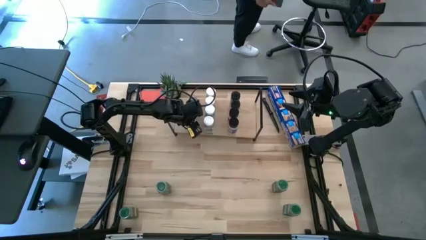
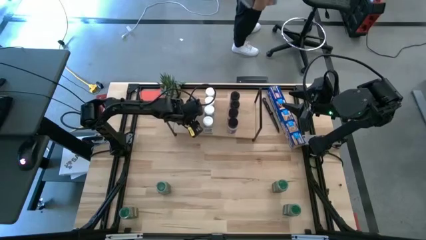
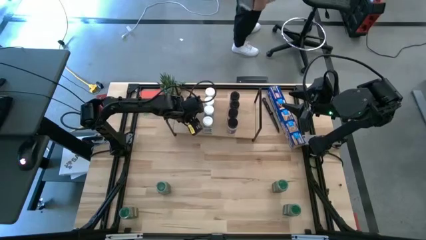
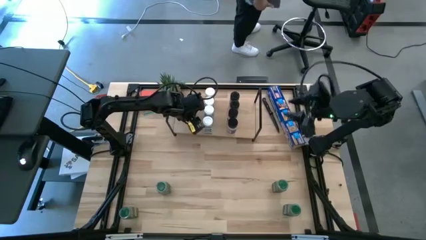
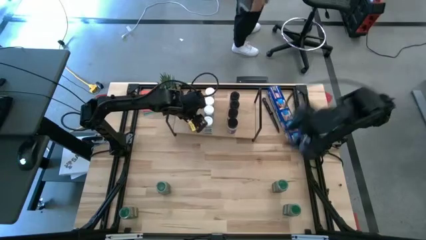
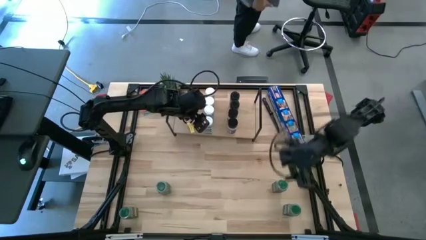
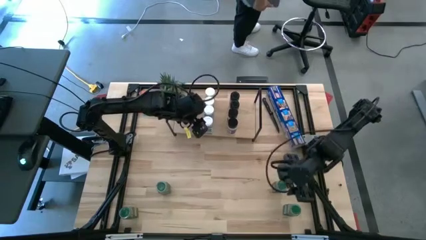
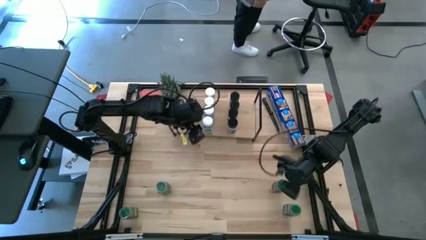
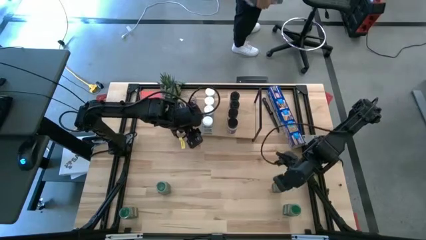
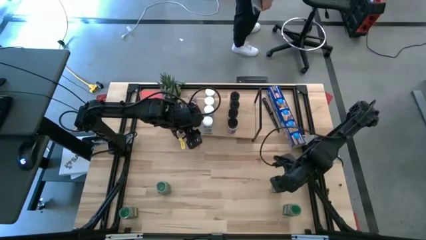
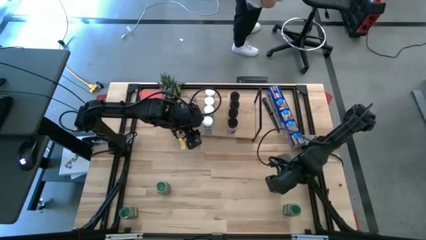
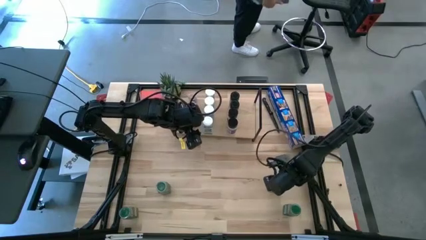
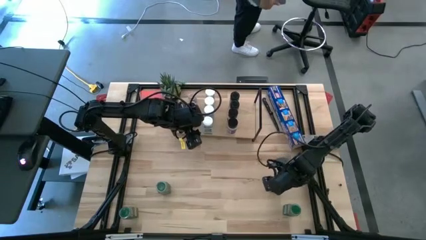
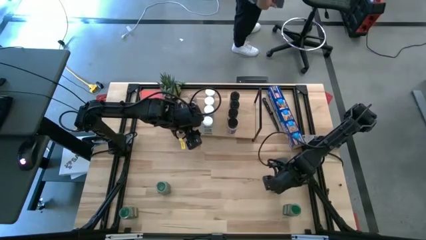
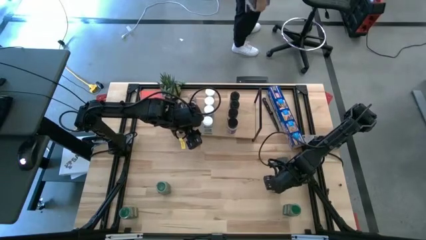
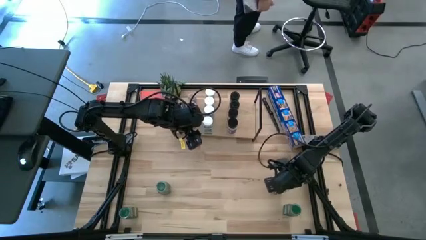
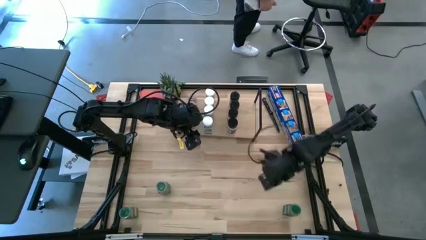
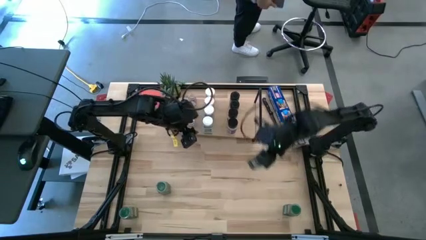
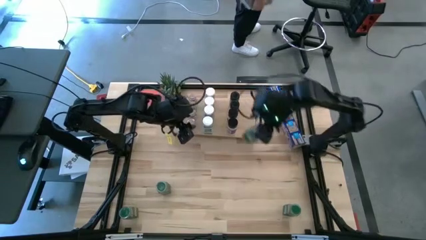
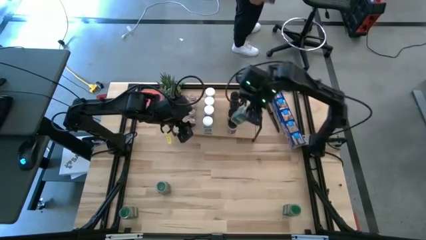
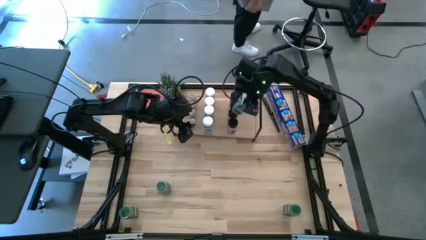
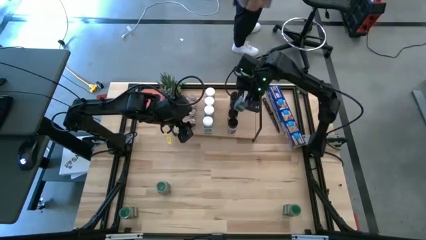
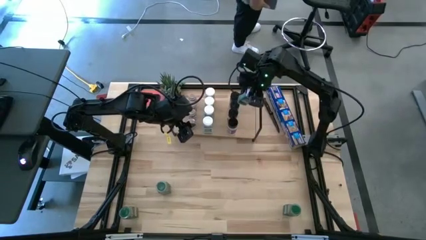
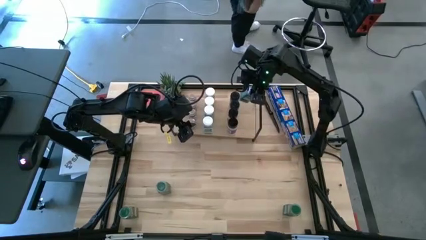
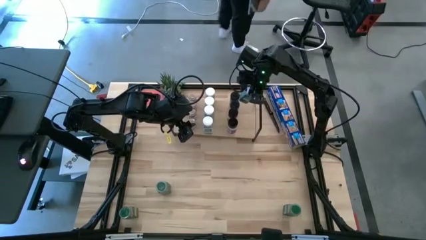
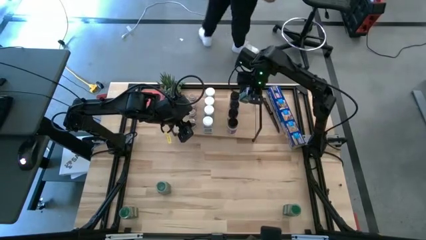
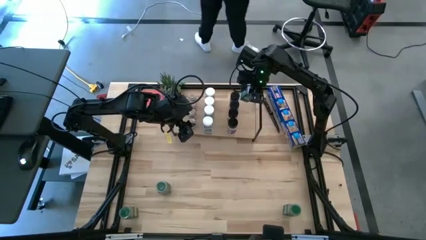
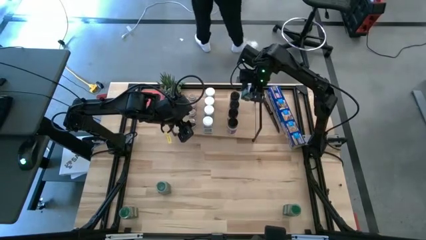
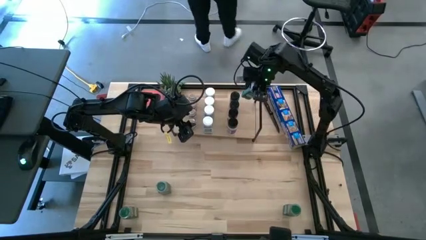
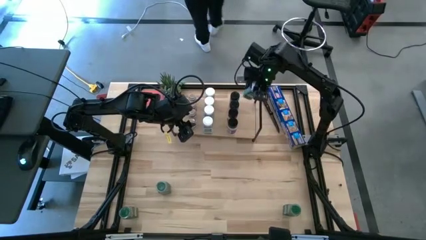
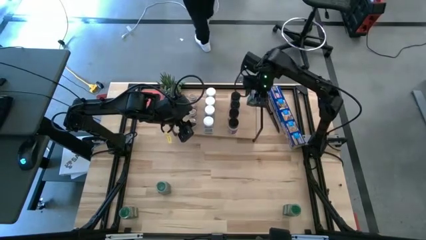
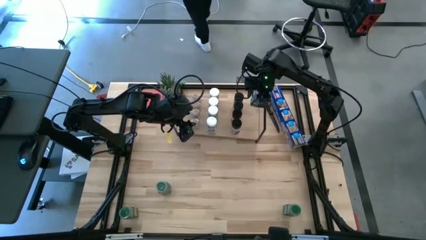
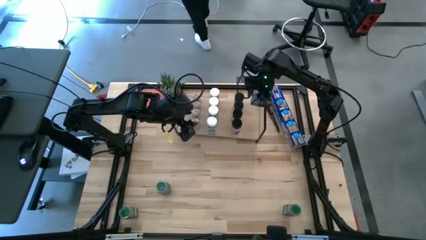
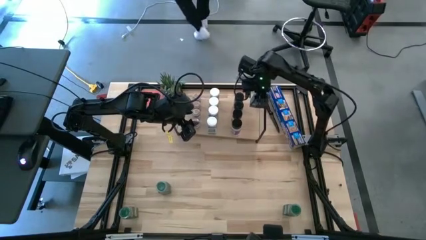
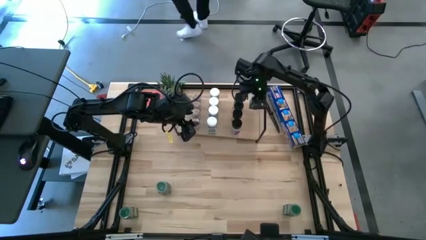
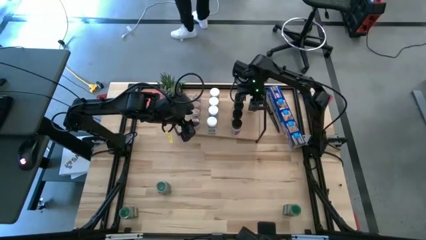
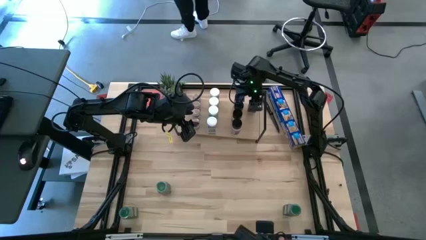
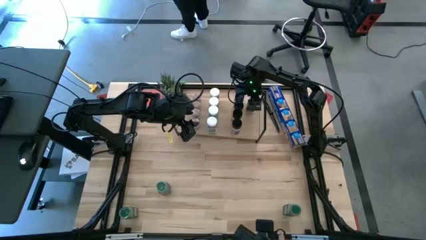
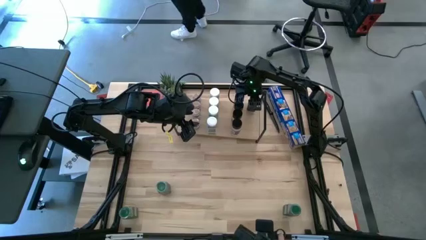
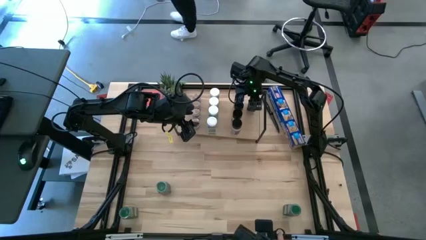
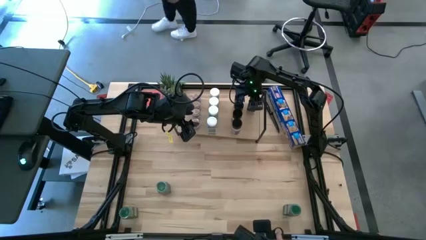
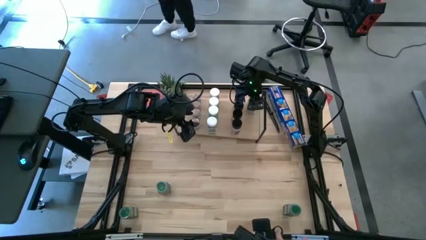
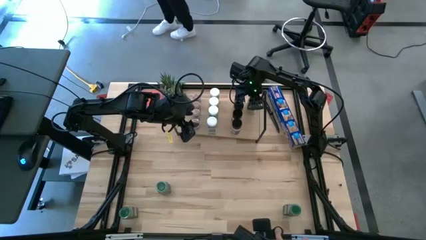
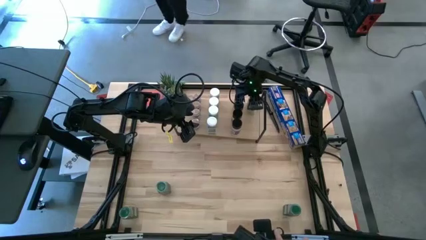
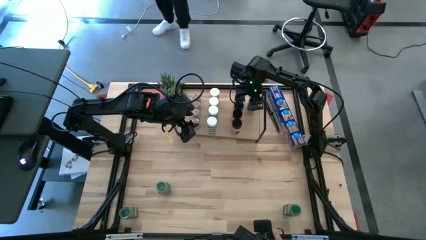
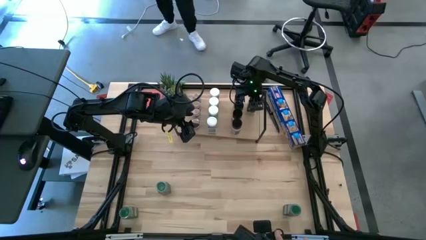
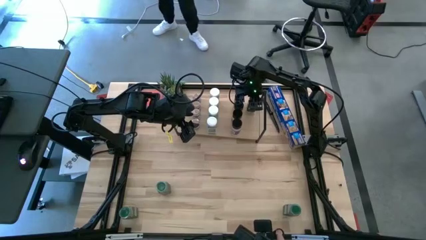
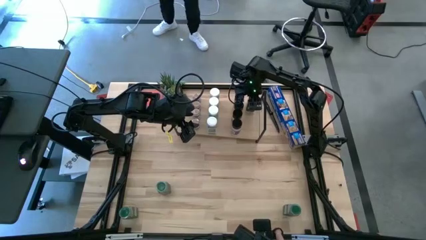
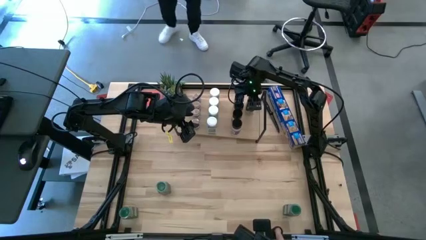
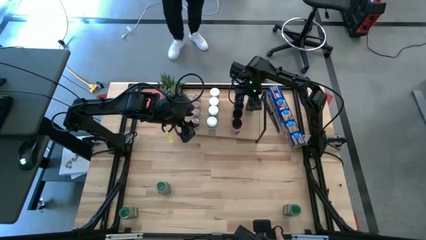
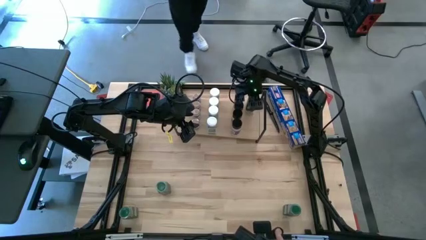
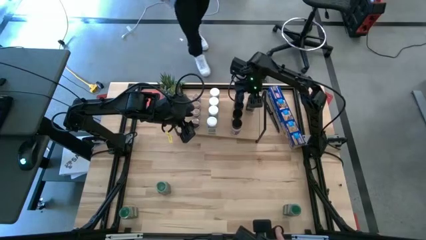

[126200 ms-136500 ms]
Task: Shelf spices
Put the green seasoning bottle on the shelf

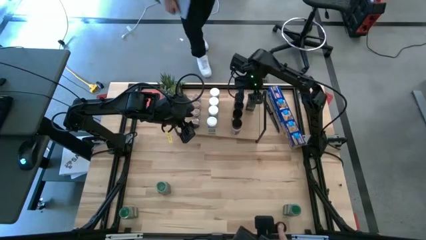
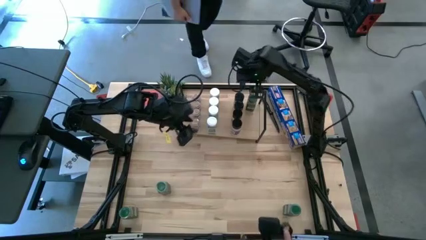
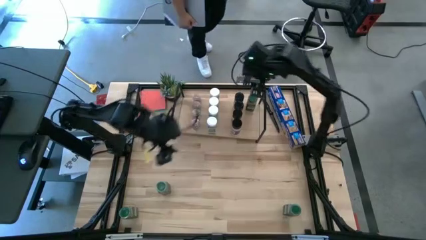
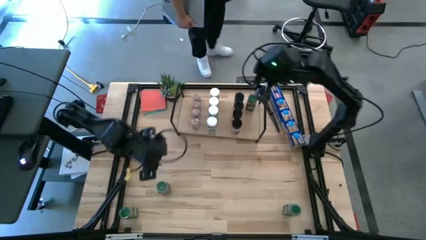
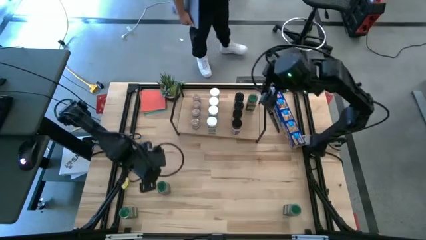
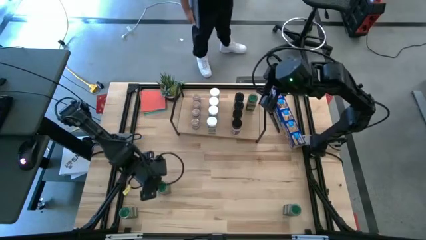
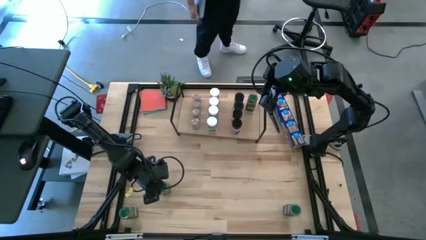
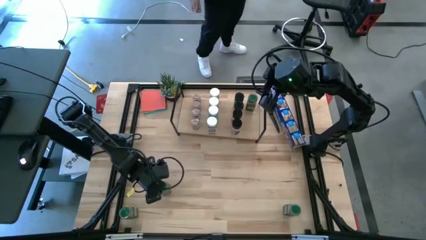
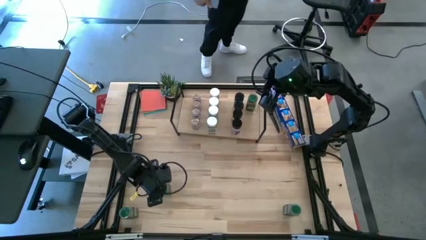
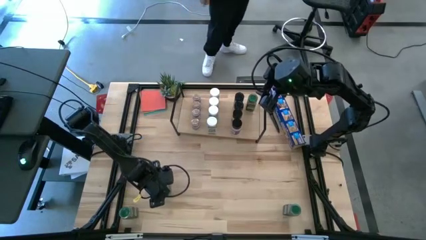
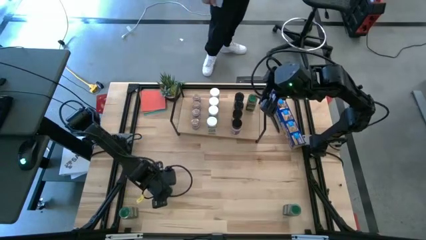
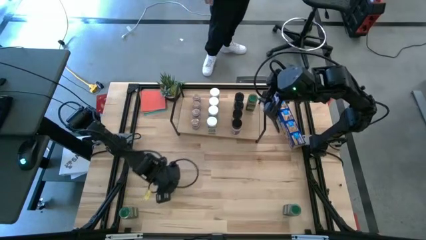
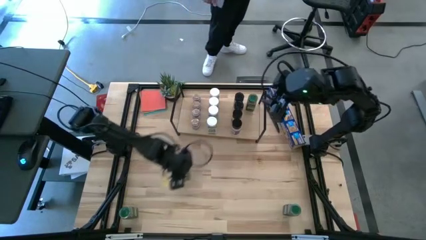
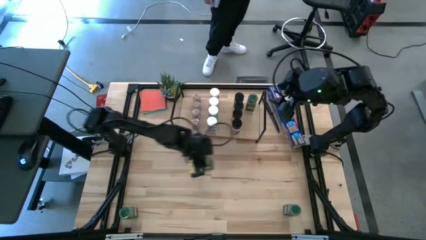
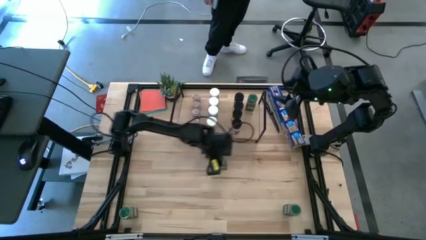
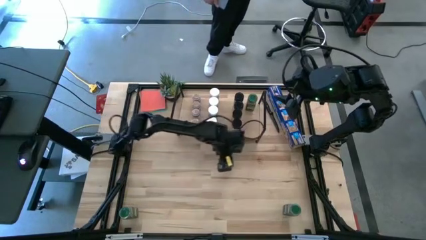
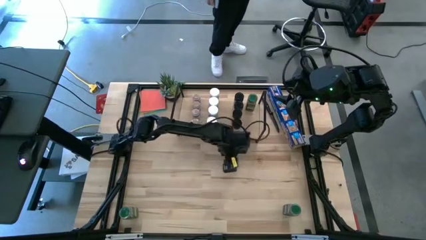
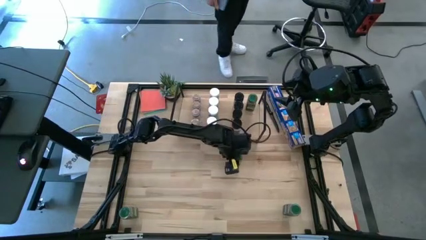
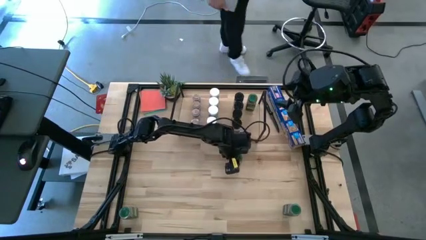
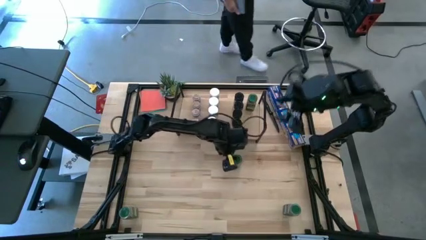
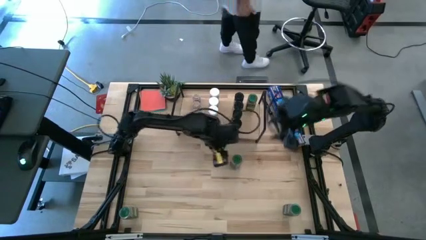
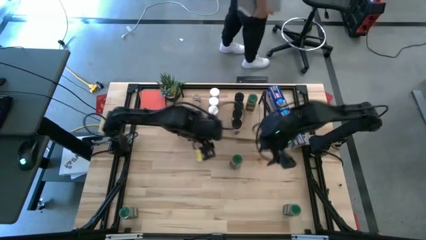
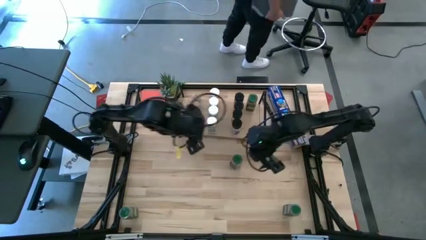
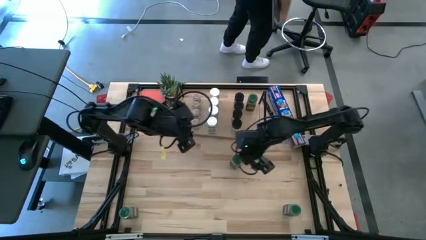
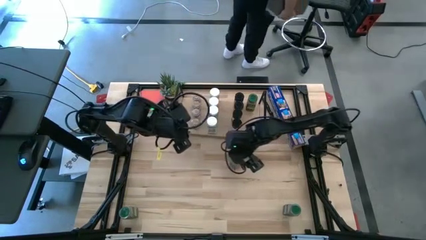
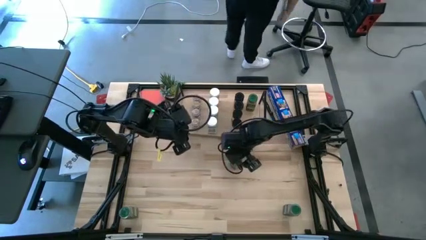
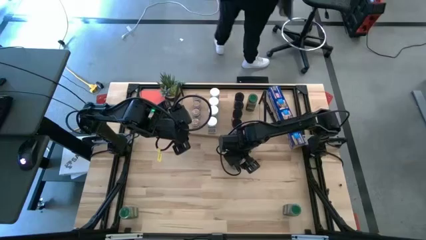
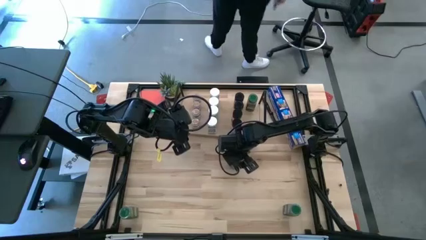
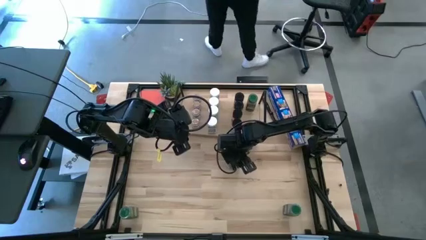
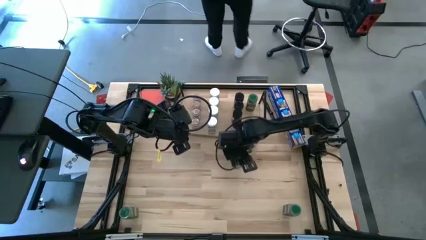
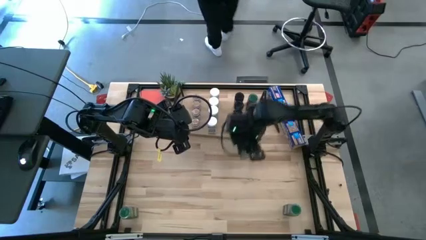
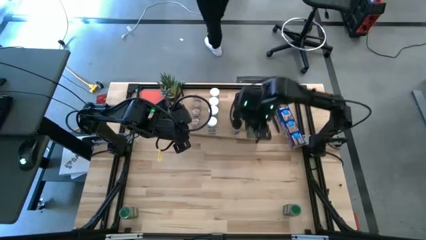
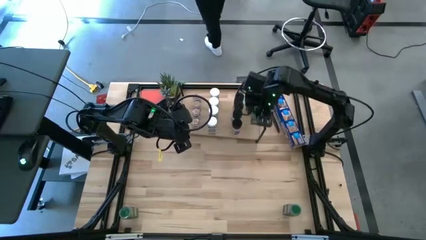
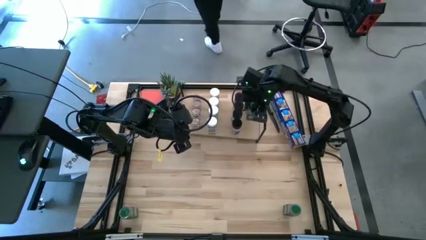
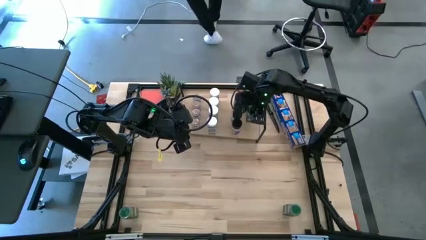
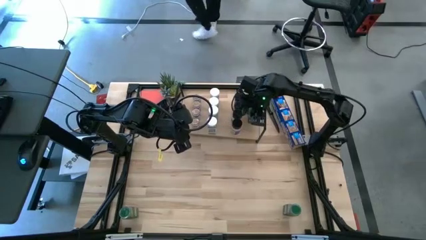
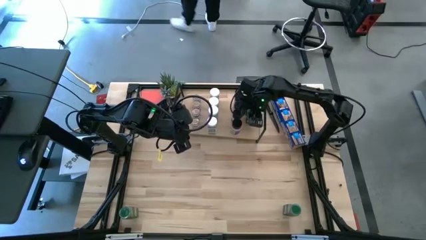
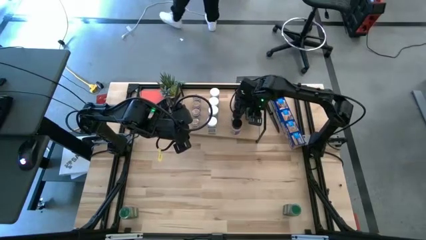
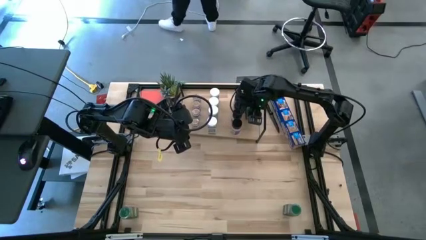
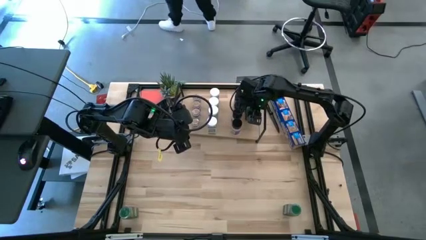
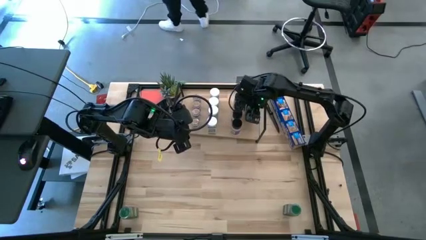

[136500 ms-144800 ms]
Put the green seasoning bottle on the shelf aligned with the other green seasoning bottles
